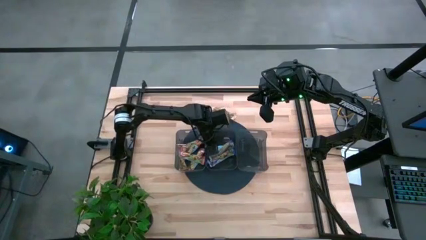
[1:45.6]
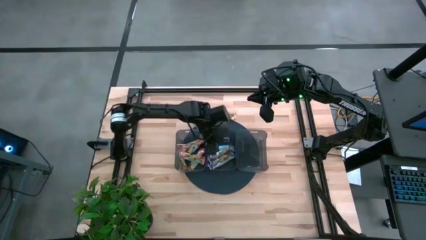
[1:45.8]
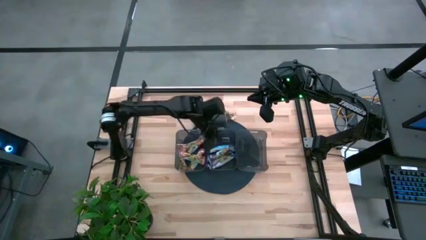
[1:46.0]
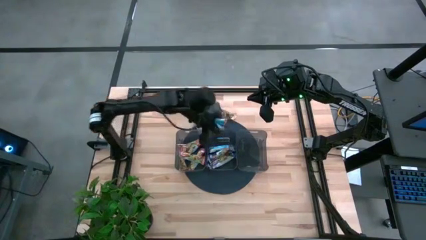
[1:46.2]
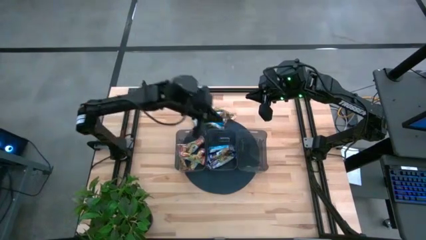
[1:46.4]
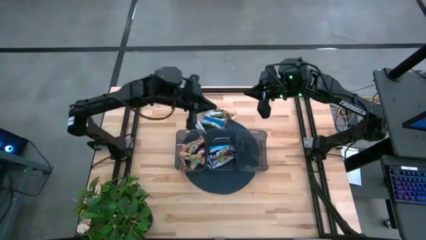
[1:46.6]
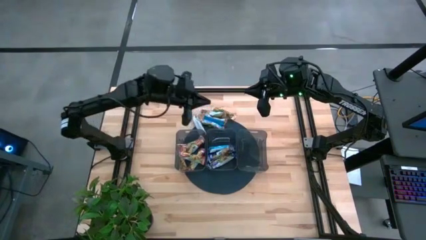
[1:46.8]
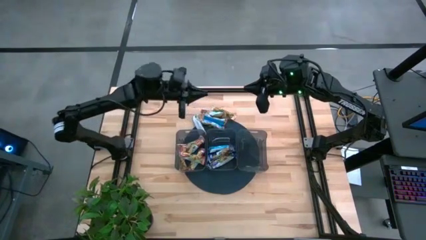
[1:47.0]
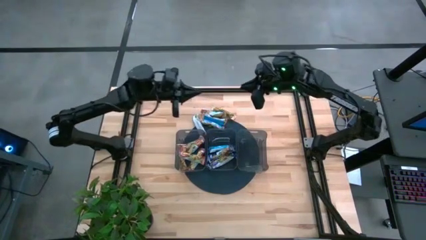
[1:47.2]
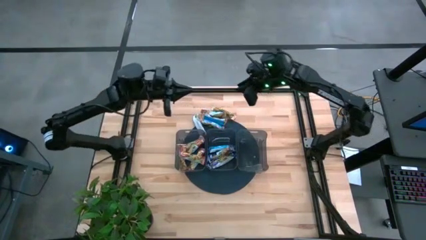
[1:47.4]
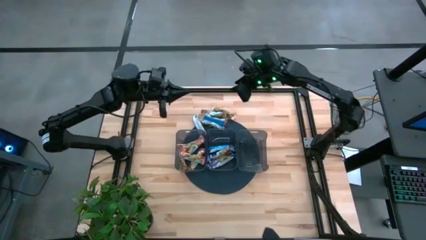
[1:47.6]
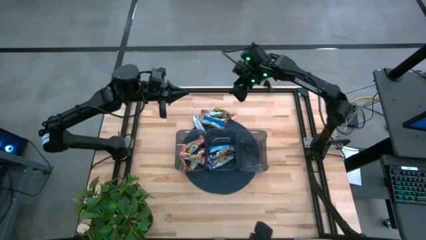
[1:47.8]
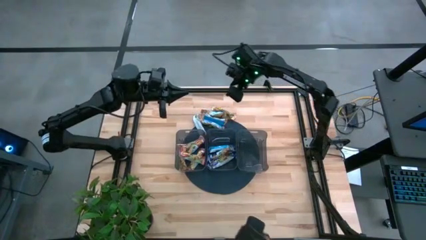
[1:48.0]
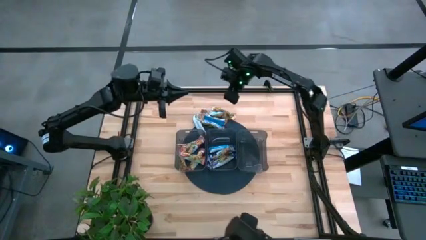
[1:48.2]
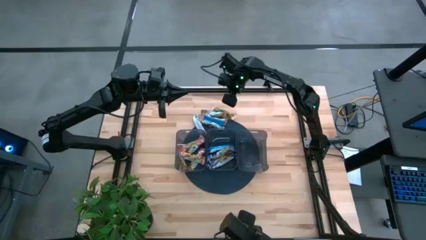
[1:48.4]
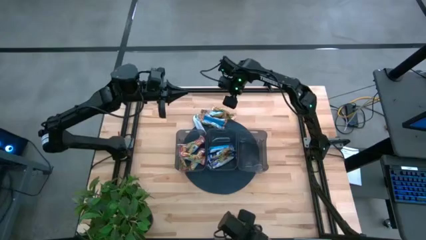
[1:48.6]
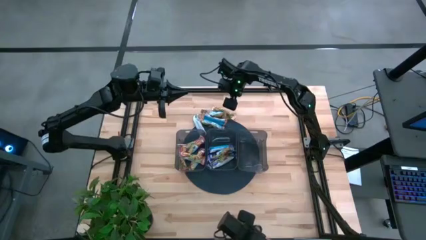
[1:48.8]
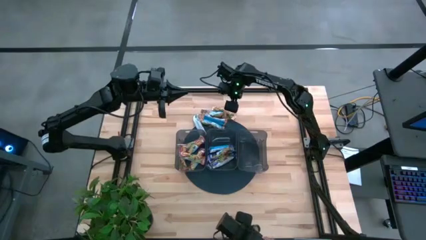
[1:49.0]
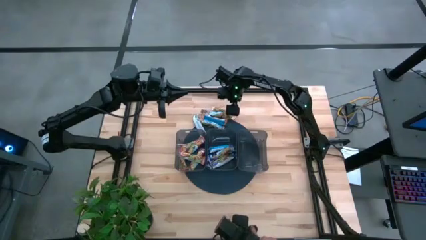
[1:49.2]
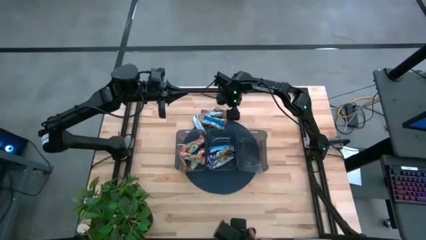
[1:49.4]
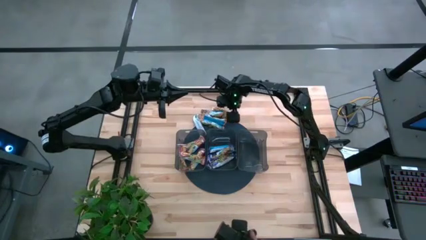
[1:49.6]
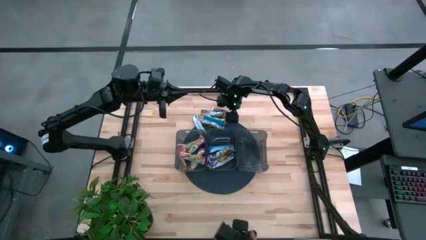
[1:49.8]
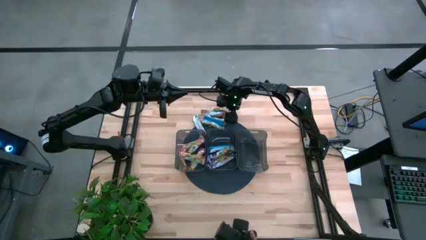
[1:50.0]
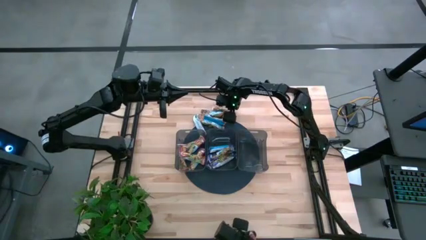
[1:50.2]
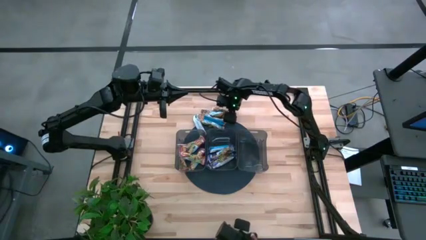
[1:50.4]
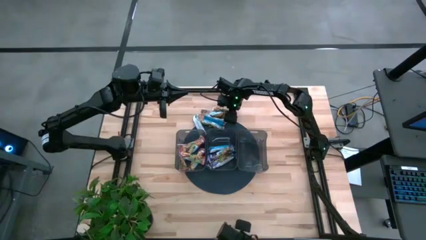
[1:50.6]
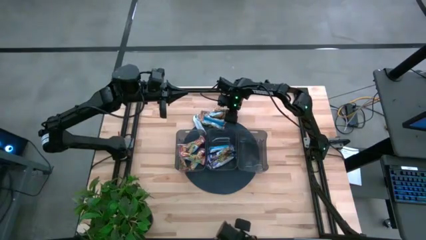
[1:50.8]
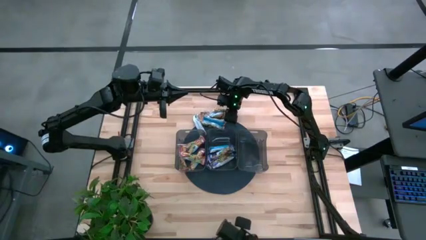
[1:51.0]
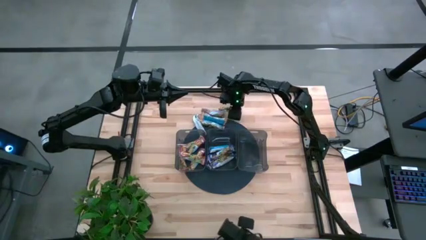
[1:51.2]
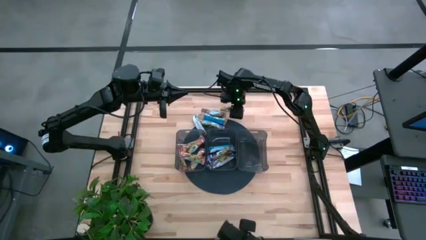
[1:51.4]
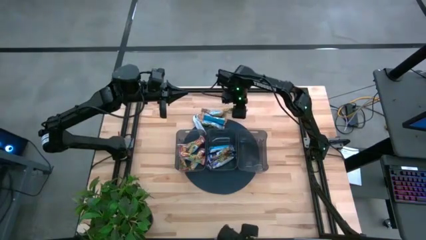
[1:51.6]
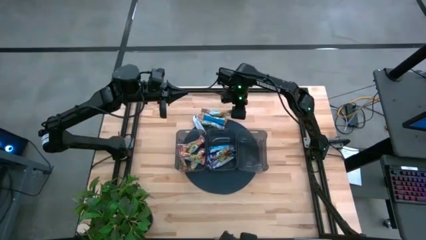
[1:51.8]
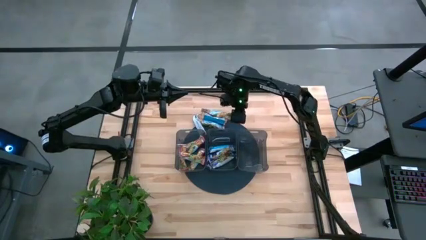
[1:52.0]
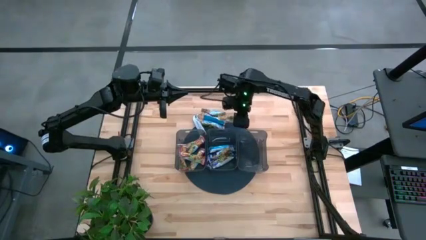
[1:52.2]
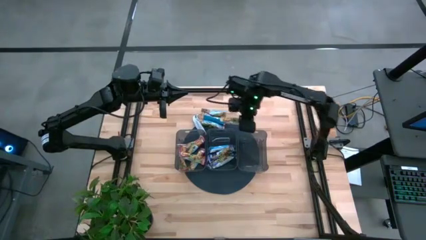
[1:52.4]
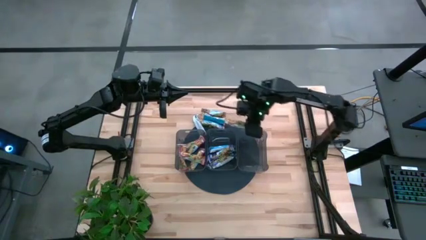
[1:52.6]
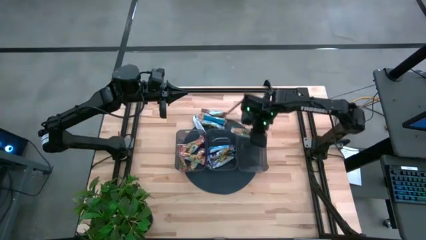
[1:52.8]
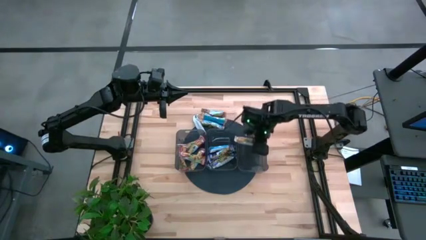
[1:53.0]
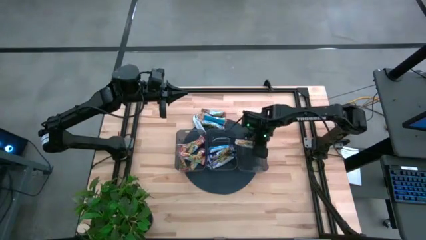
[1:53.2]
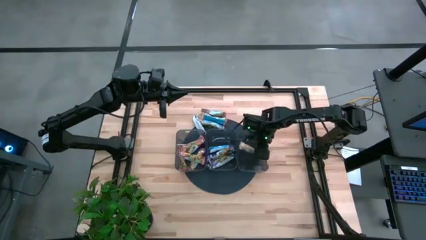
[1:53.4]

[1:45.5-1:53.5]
Task: Pick and place Granola Bars by type
Put the yellow granola bar into the right black bin

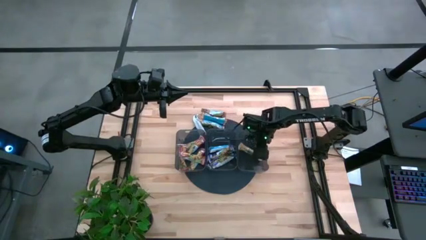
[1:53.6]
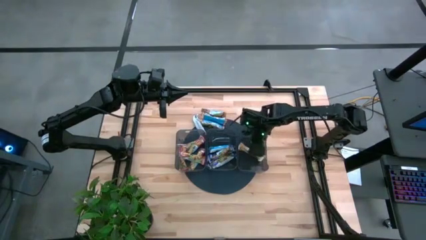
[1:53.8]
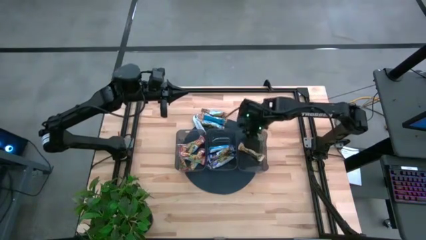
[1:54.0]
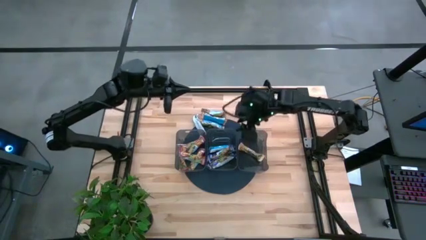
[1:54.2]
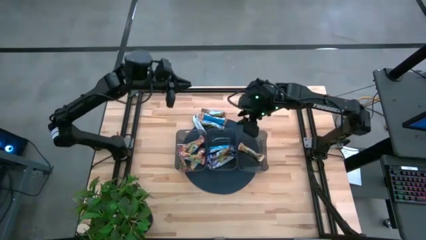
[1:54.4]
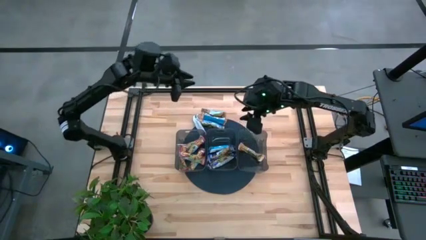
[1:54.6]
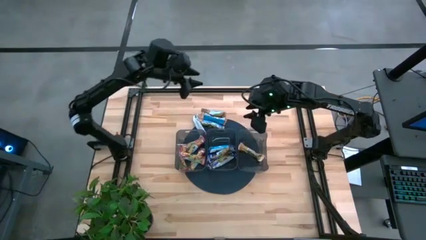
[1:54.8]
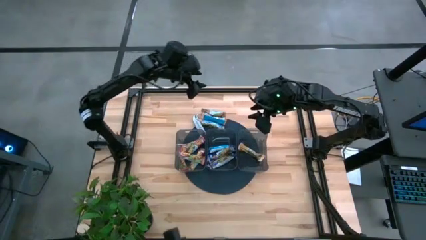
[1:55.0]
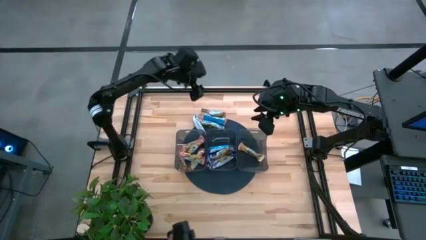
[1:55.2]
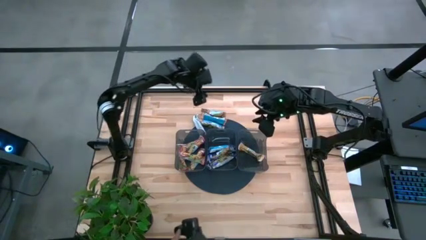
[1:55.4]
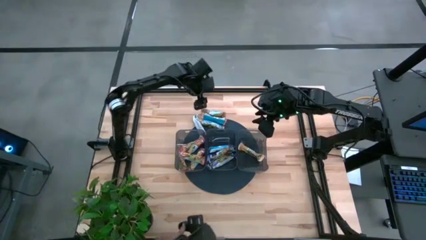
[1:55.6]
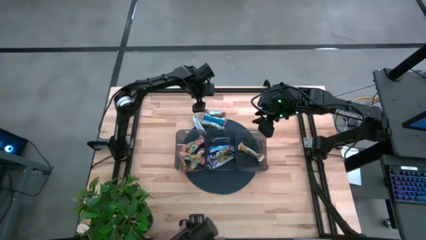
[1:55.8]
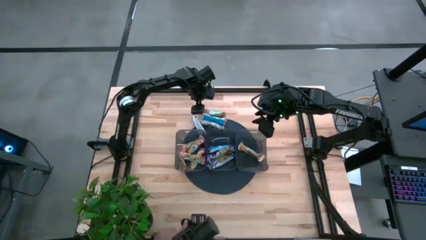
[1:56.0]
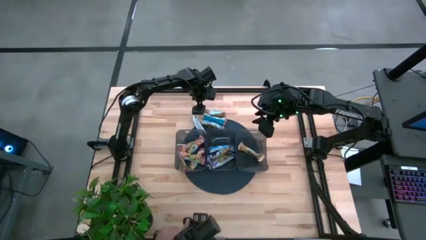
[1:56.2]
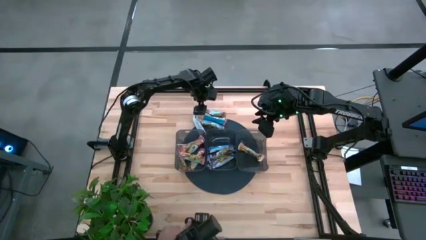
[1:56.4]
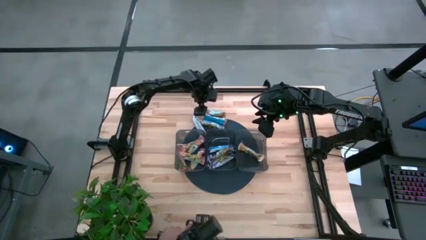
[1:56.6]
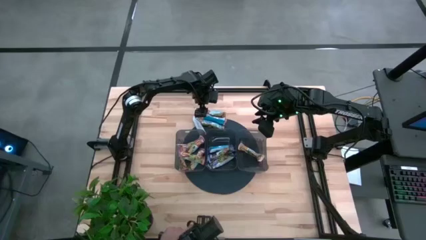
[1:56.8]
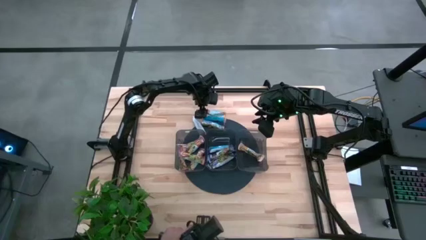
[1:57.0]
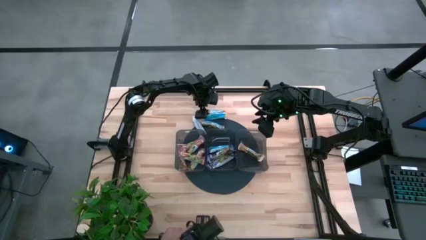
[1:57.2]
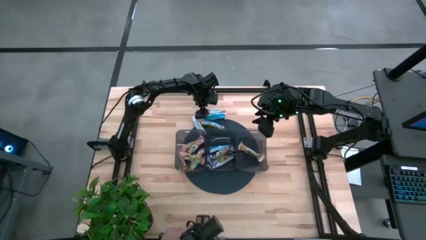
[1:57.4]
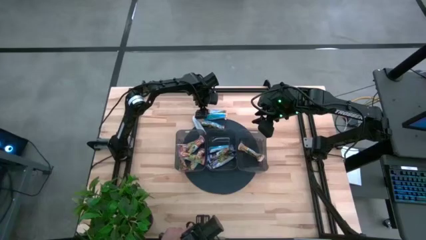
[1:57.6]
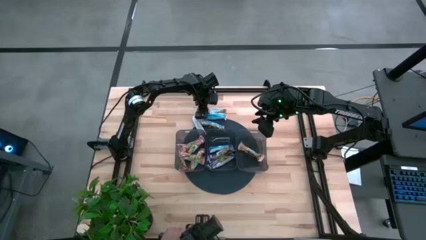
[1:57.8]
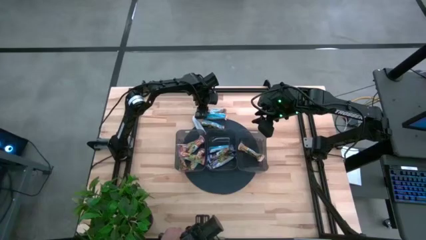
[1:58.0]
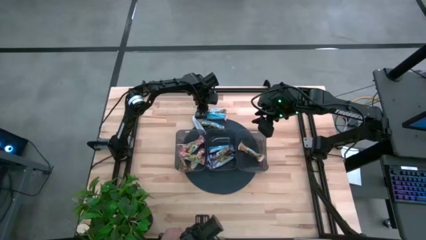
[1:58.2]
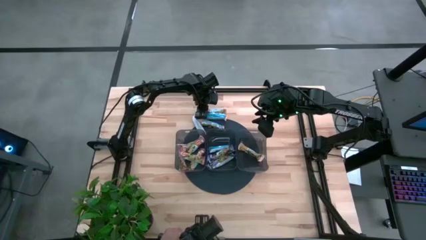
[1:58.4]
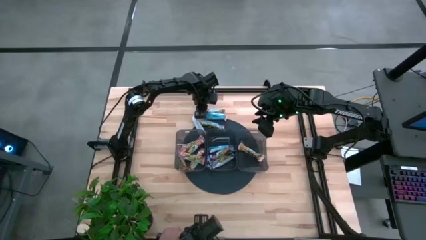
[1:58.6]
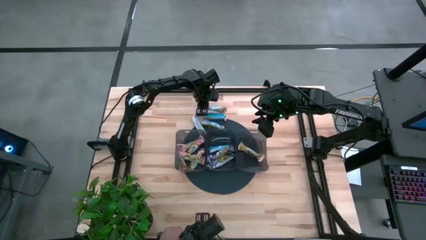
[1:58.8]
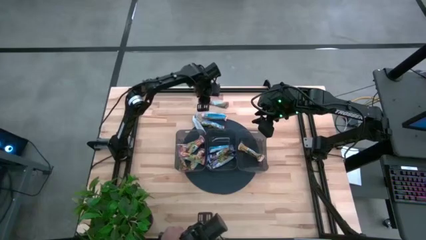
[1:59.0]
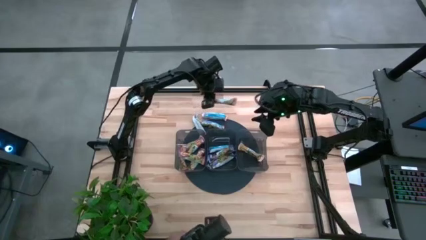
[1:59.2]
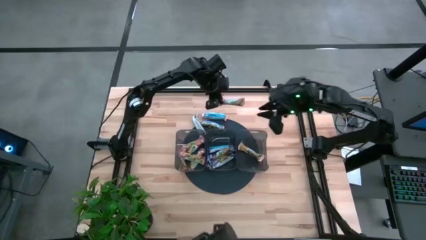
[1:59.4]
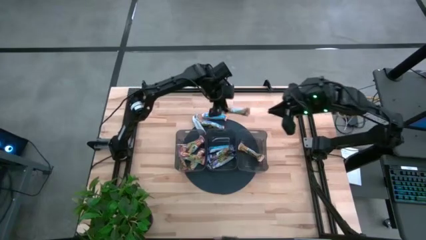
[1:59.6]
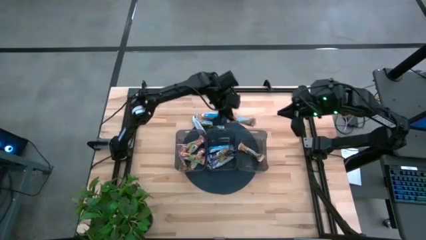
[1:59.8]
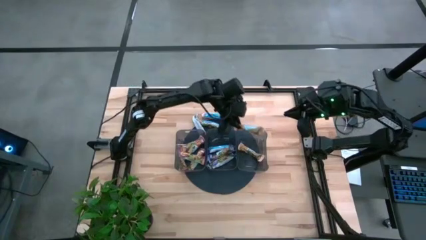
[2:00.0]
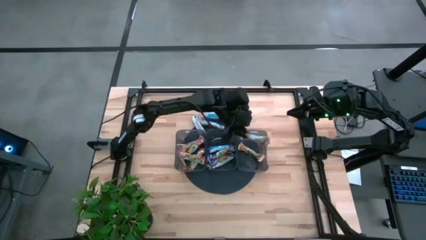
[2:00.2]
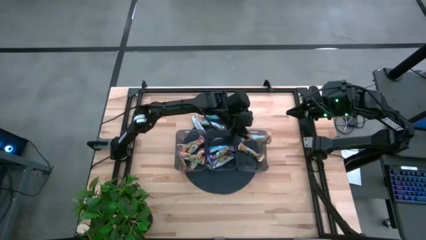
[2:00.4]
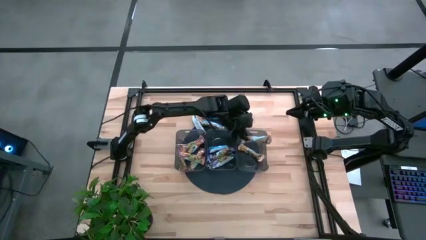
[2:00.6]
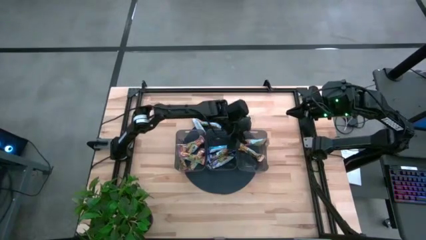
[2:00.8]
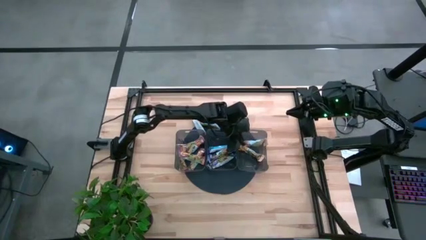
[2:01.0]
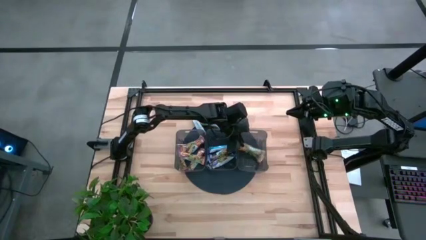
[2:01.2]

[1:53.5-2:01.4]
Put the yellow granola bar into the right black bin
